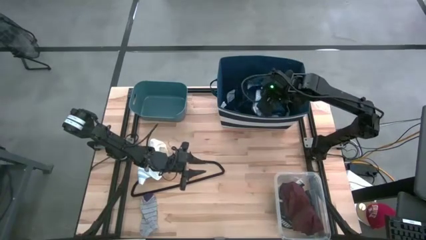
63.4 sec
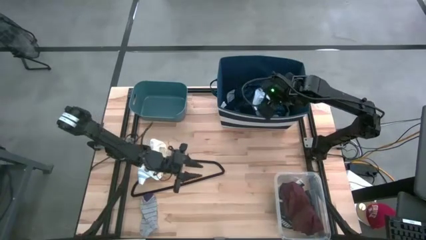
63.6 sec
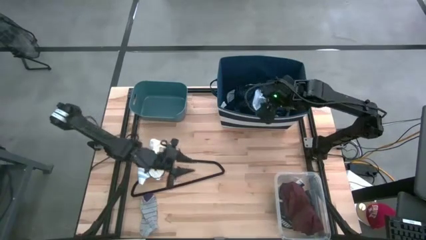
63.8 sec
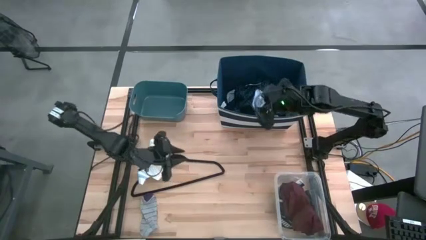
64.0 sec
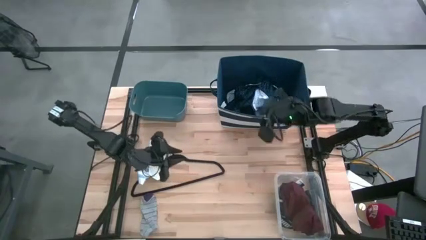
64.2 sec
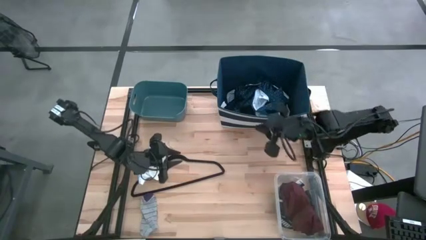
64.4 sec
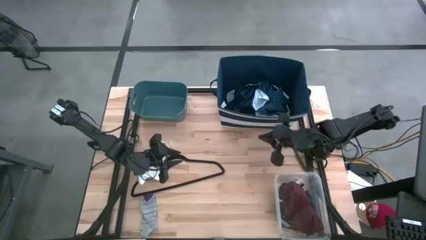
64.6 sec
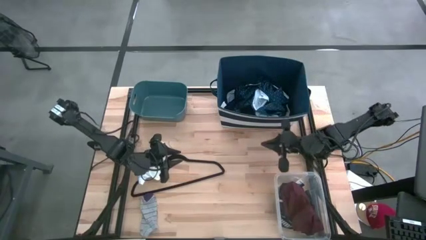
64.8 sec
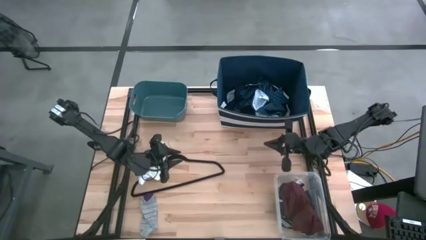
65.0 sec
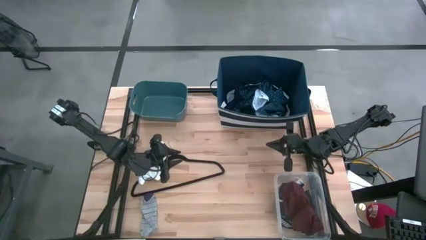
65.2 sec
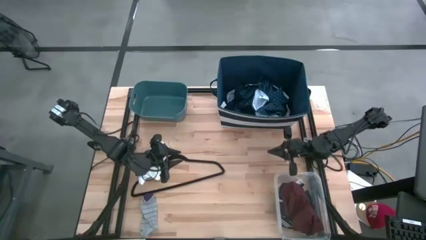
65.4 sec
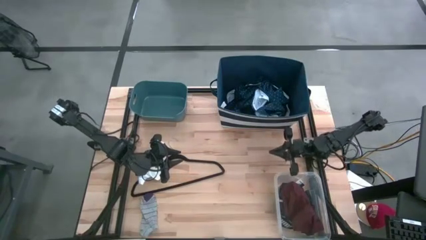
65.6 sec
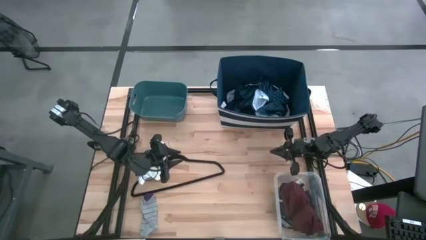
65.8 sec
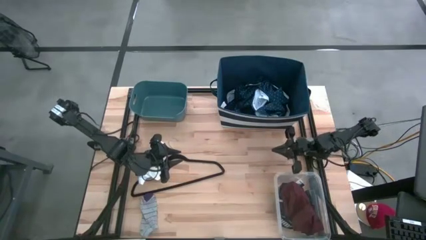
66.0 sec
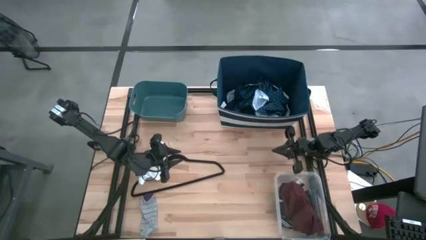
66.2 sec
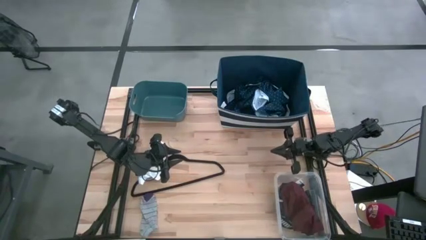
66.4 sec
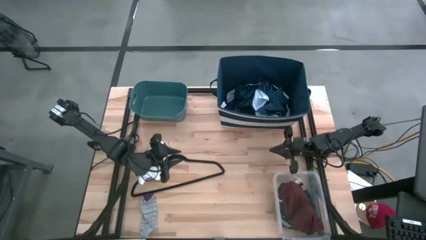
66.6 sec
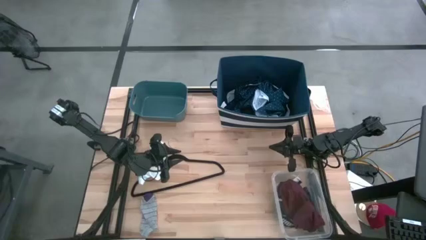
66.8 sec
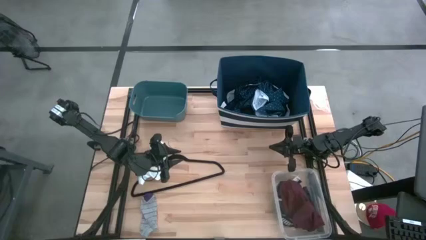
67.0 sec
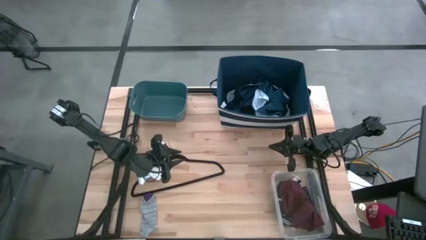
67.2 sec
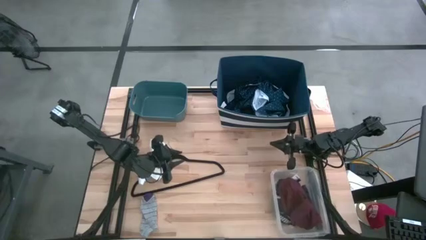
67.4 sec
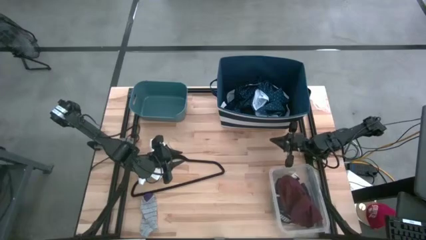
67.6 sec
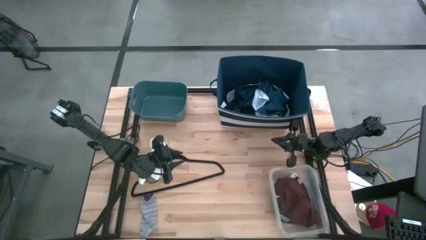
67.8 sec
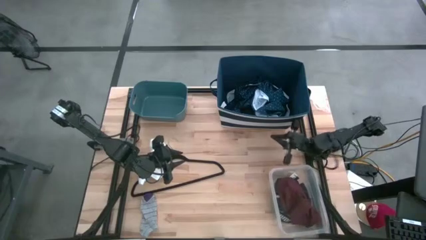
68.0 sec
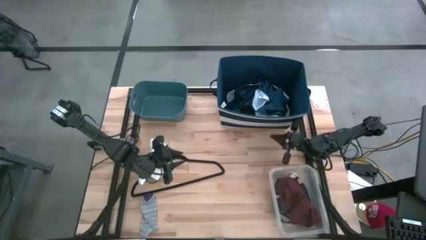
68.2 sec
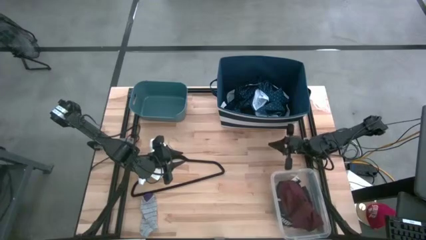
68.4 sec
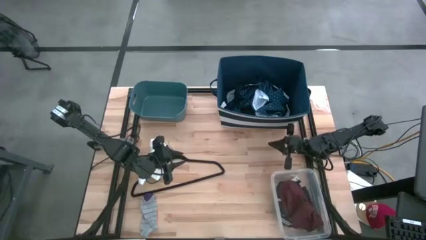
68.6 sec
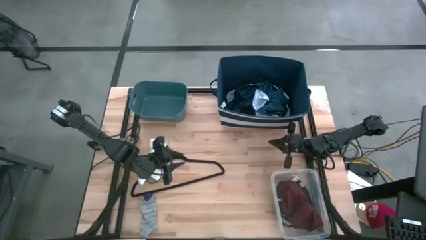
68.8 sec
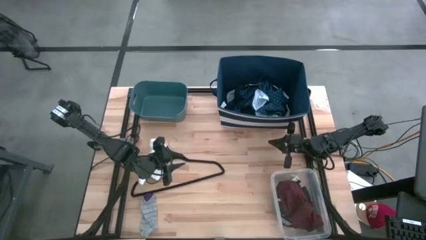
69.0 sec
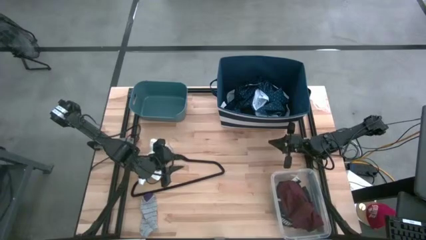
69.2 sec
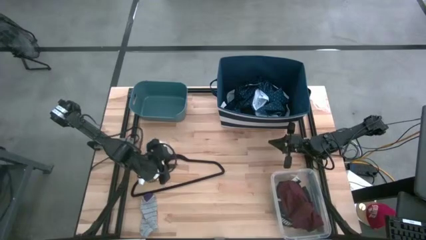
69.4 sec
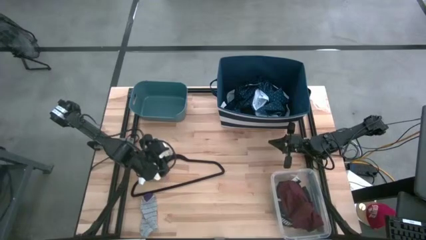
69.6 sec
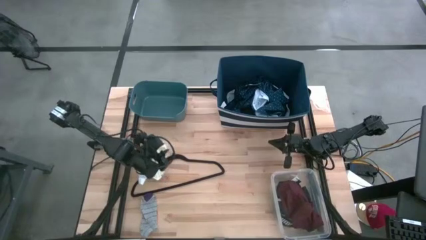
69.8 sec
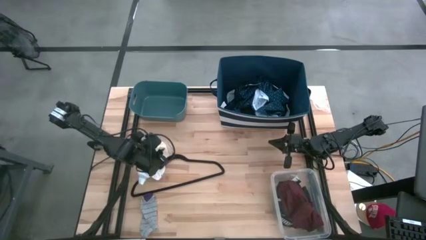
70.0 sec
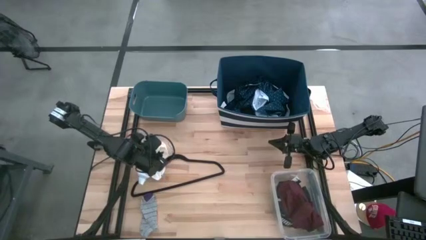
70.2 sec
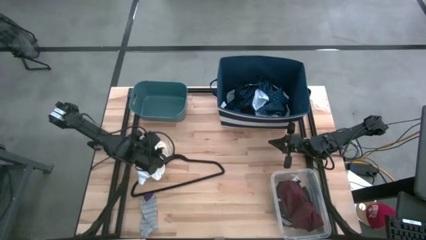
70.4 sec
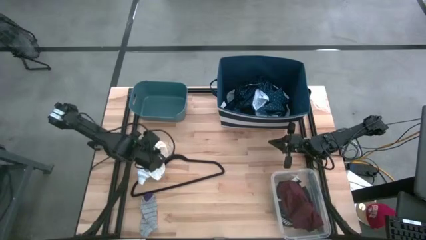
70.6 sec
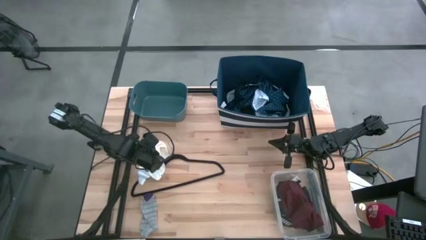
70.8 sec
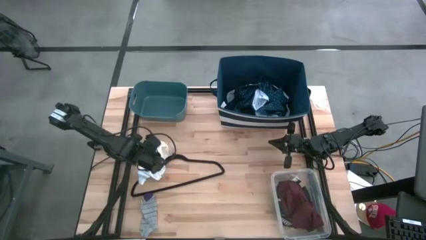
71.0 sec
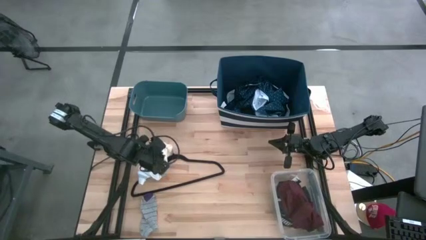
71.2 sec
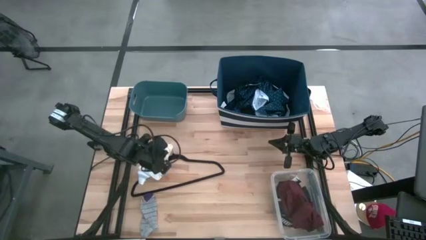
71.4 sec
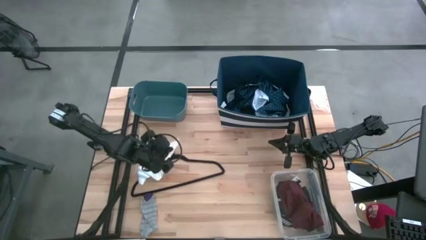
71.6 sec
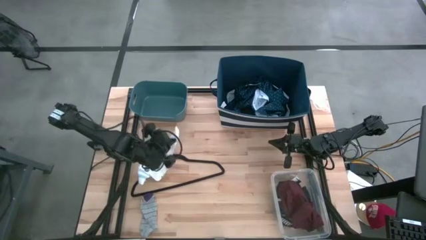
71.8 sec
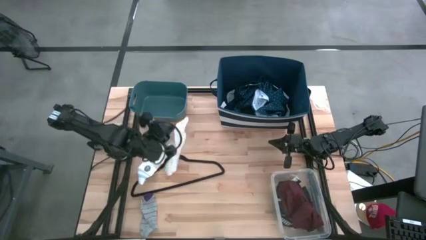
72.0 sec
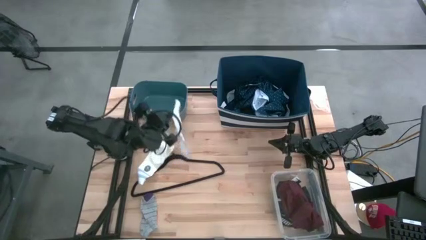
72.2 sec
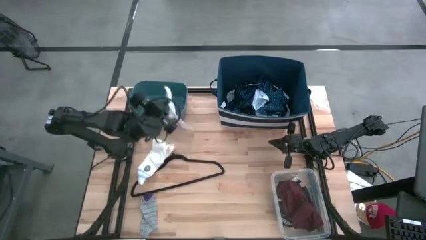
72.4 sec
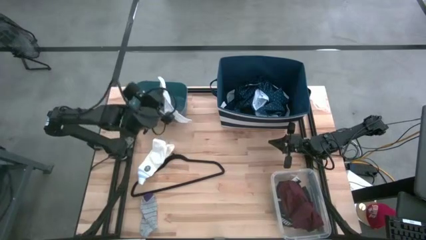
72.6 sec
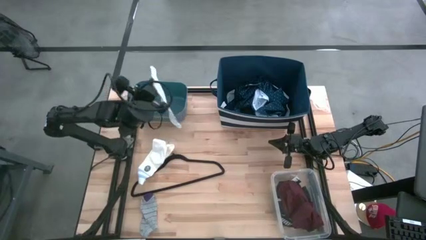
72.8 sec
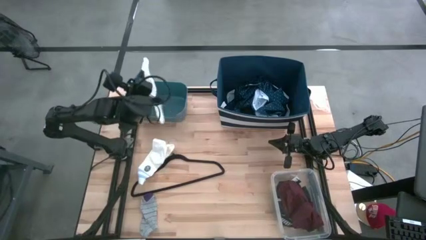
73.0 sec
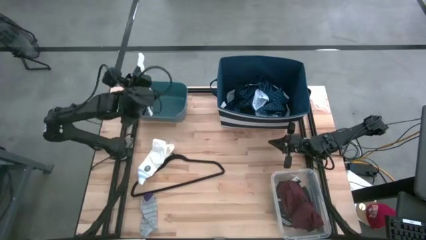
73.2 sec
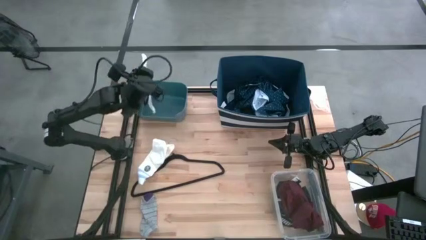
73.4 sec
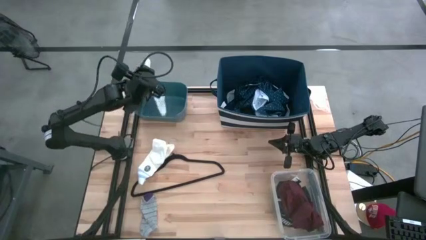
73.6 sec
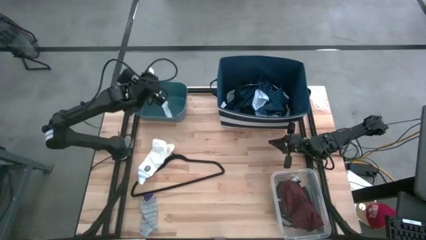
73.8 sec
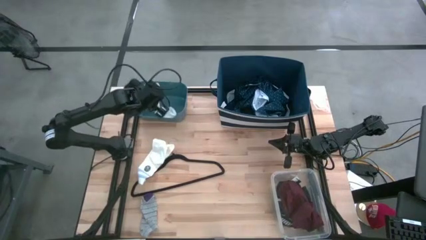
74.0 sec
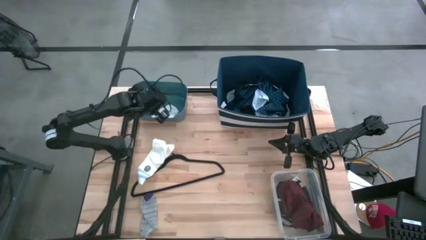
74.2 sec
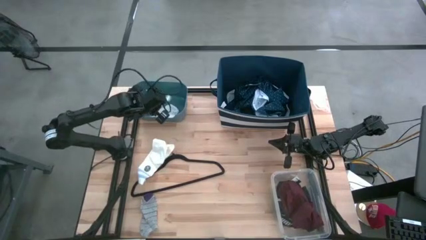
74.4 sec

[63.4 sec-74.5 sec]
Task: Pick & Place Cloths
Put the white sock into the light blue bin

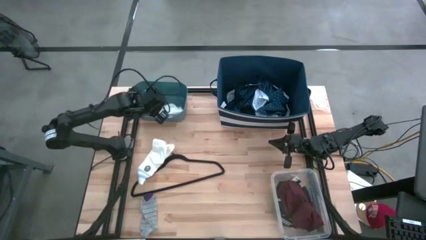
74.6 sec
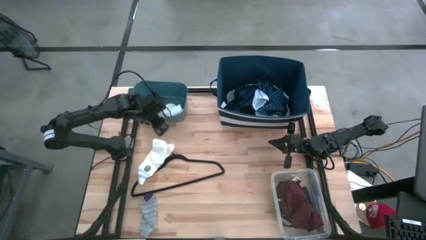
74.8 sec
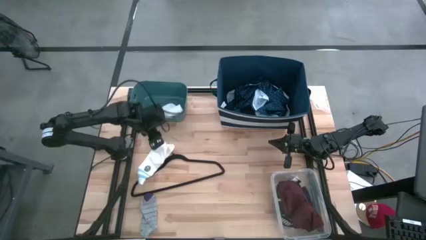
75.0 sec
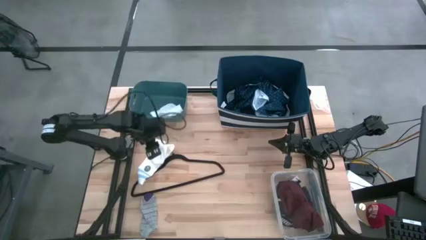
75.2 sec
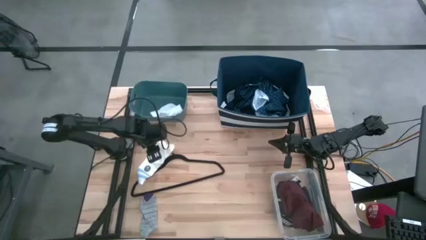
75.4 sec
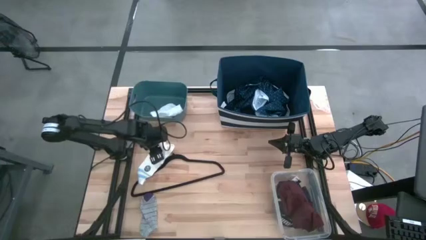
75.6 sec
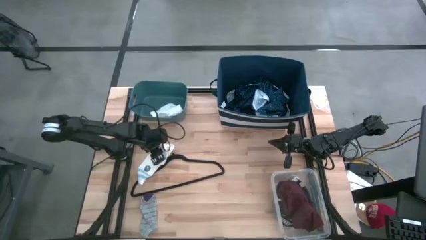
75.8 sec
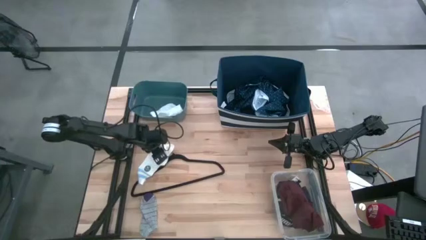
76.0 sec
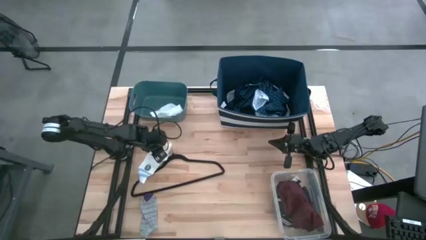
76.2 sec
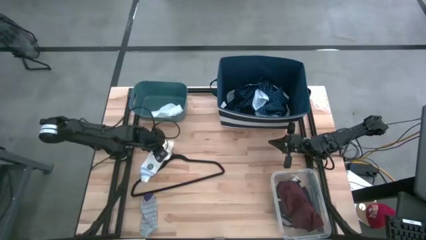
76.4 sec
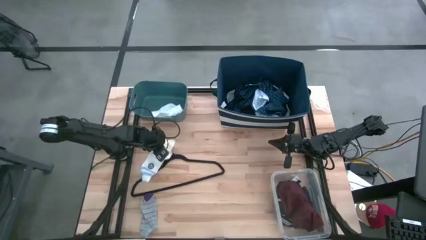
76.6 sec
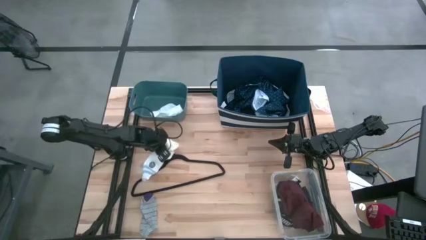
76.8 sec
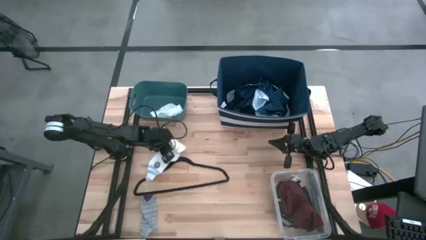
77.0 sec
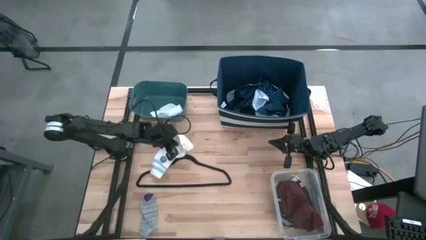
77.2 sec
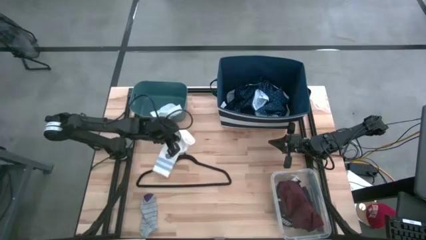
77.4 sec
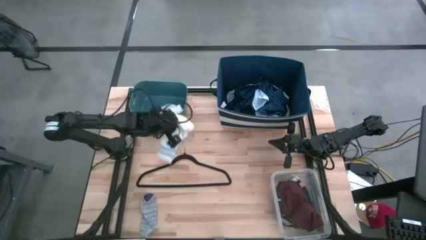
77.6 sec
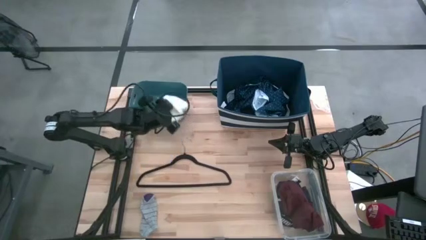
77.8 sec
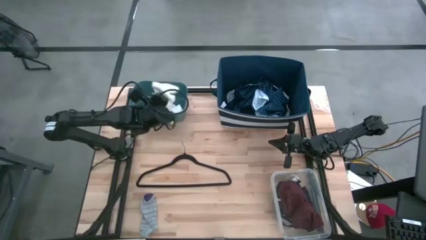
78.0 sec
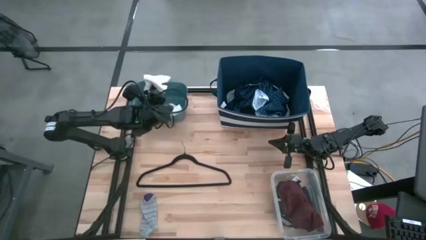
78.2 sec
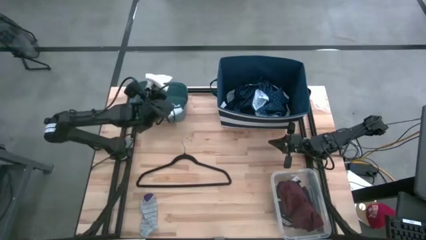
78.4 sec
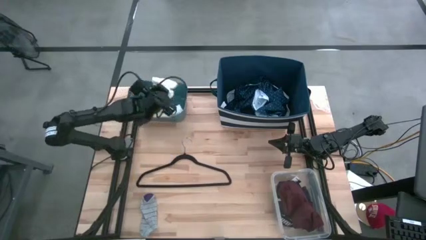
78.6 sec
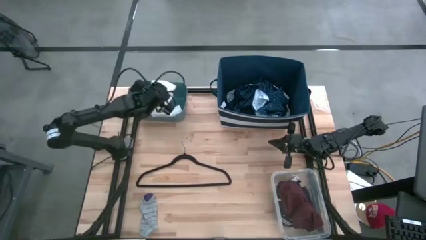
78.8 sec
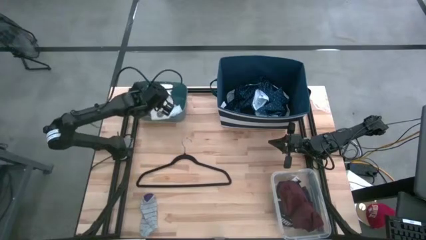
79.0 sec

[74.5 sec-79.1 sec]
Put the white sock into the light blue bin
